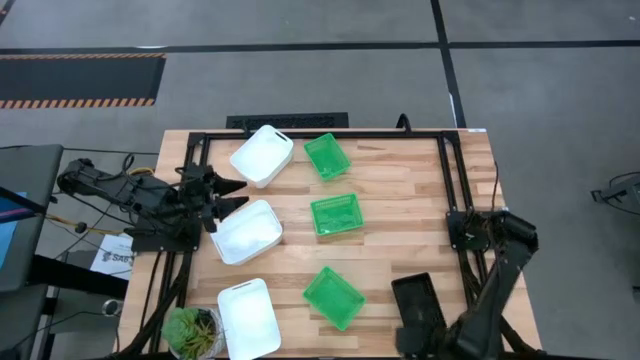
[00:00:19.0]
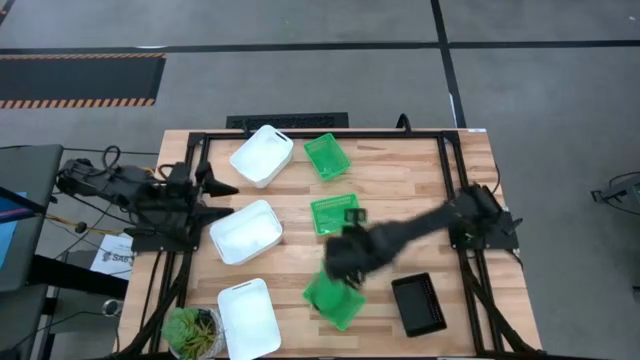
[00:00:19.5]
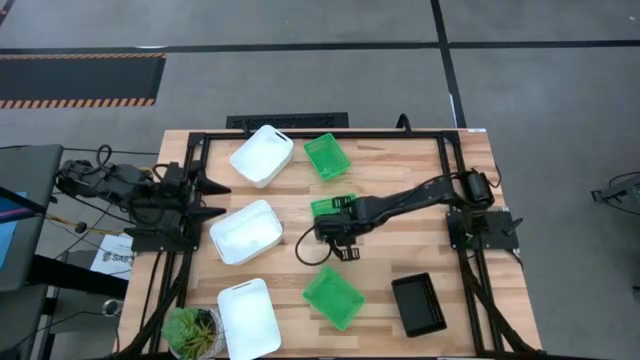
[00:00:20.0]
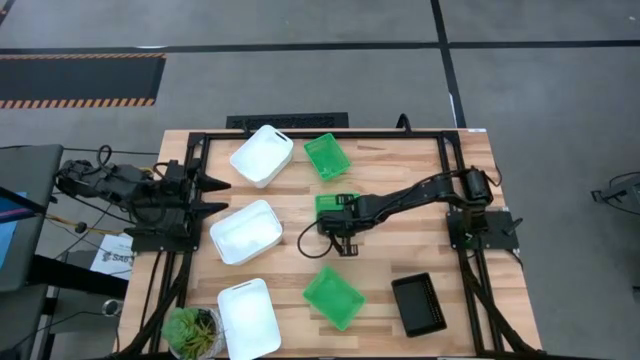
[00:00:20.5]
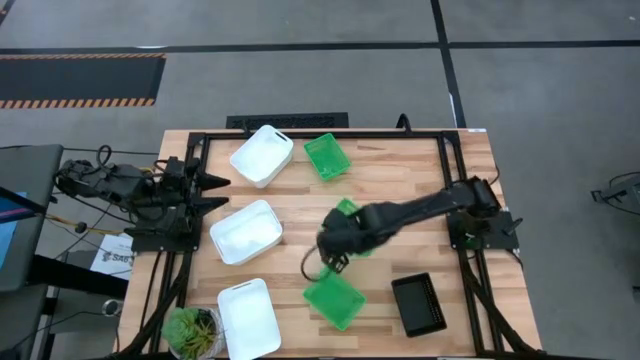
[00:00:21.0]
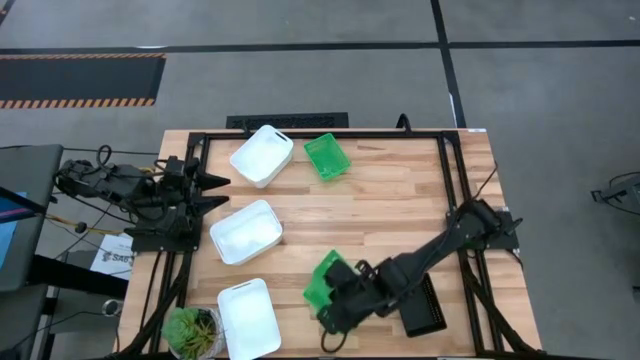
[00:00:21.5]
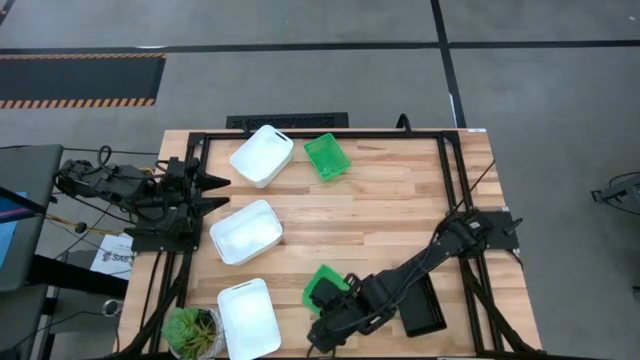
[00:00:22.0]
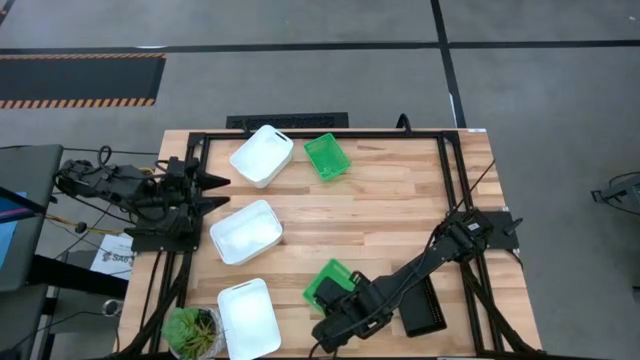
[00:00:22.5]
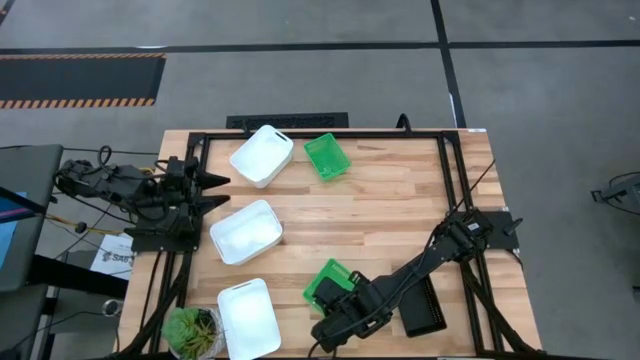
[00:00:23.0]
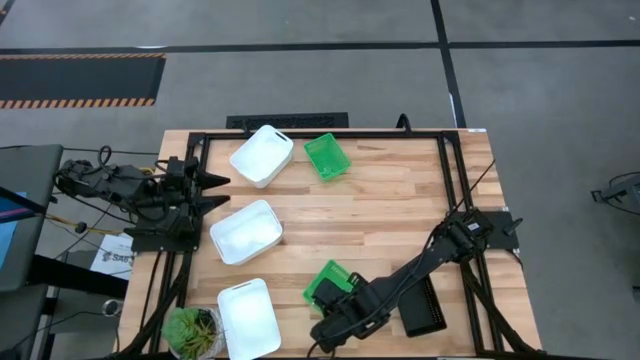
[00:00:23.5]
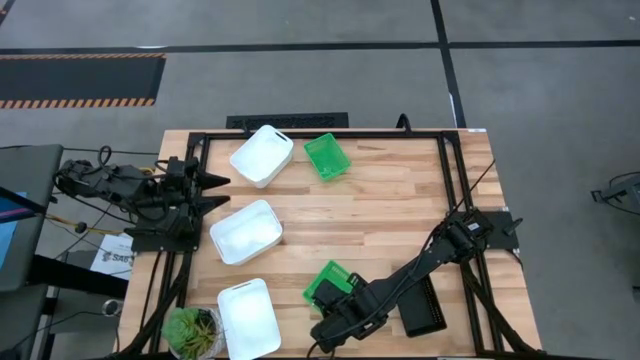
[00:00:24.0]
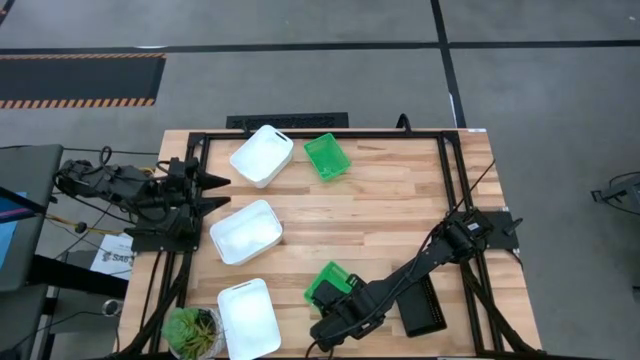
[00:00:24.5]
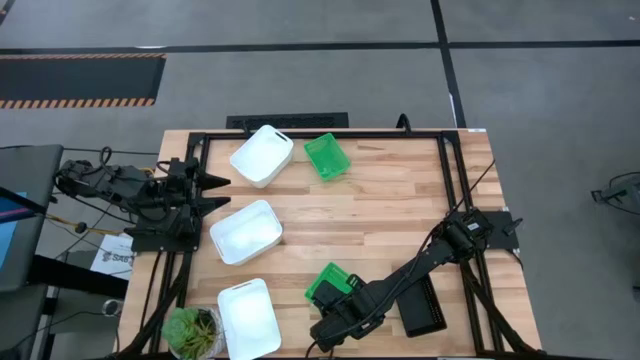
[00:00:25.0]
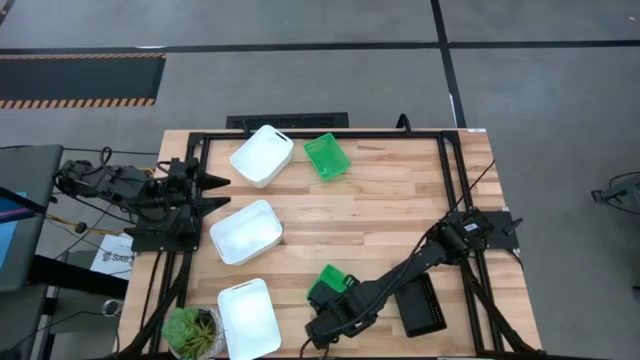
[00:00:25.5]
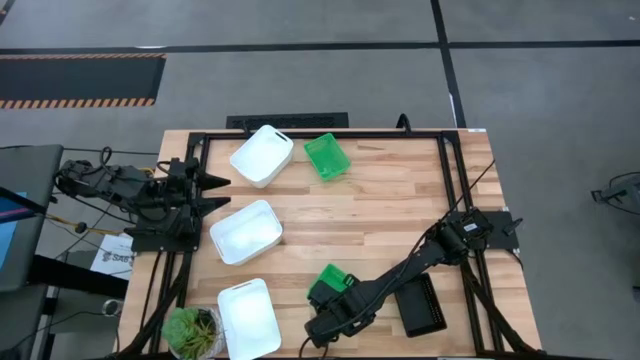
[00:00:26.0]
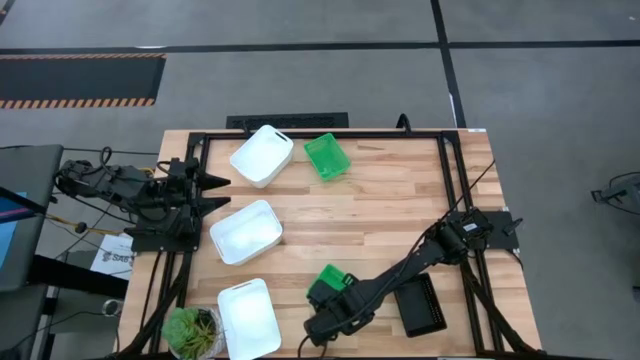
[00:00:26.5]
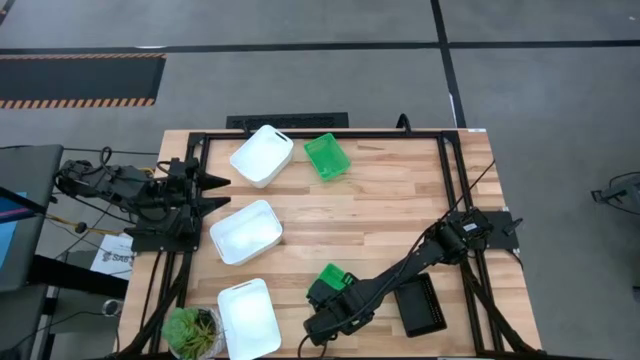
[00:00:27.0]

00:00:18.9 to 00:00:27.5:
Stack the middle green bin on the bottom green bin

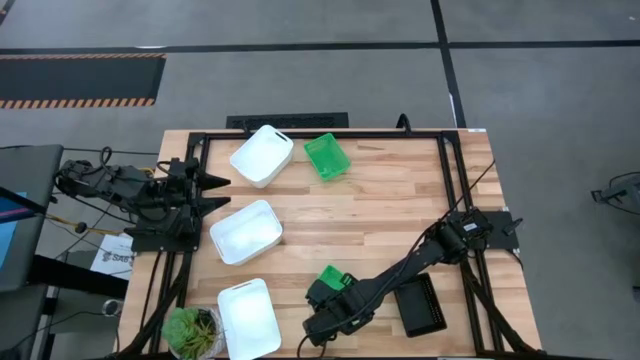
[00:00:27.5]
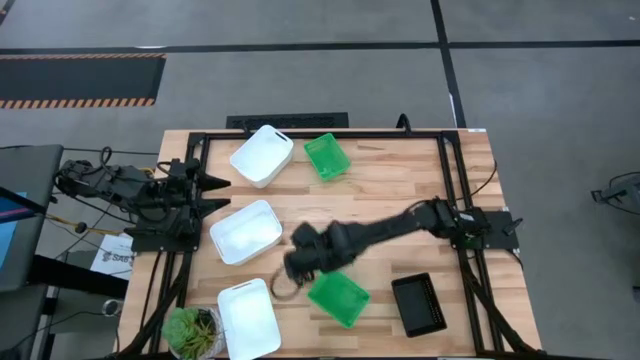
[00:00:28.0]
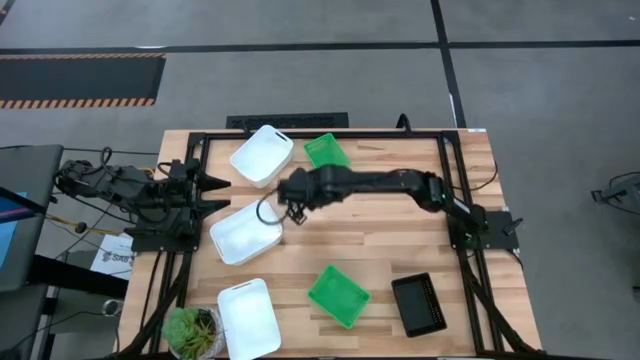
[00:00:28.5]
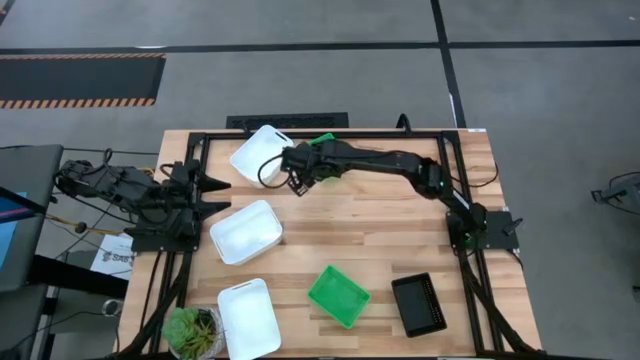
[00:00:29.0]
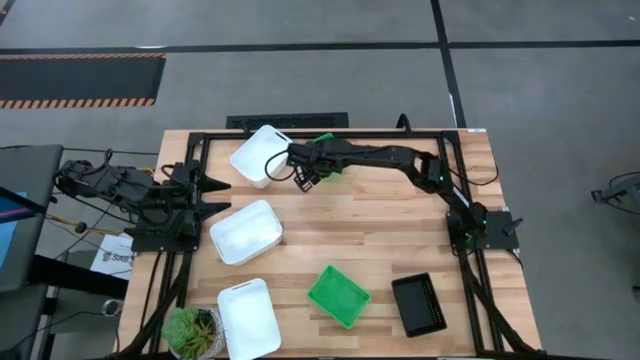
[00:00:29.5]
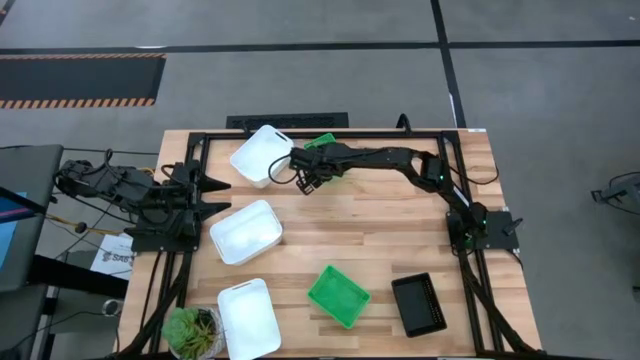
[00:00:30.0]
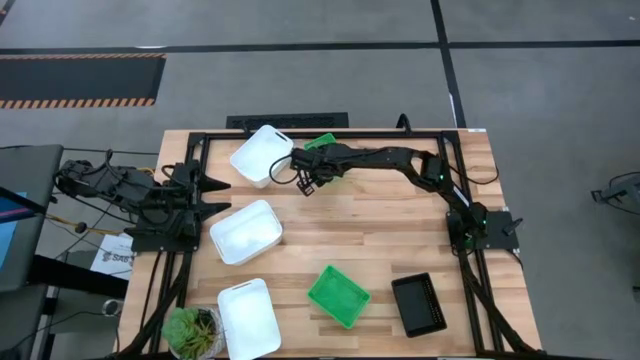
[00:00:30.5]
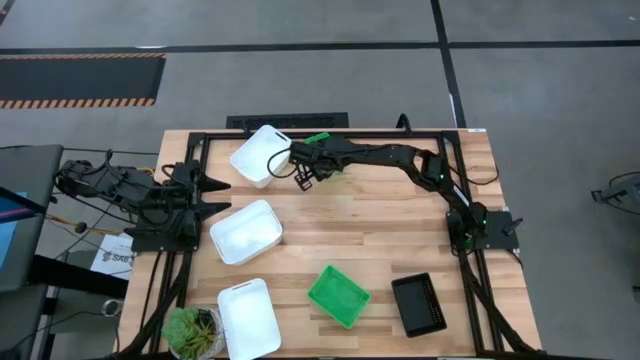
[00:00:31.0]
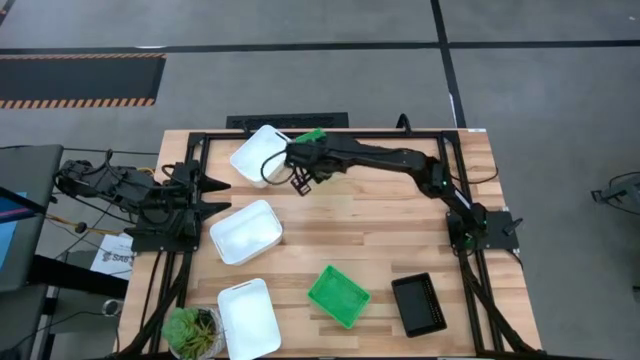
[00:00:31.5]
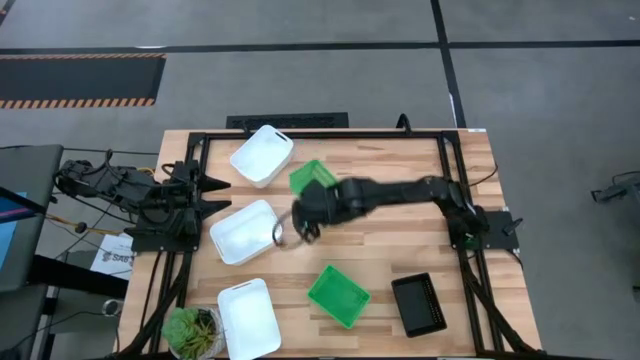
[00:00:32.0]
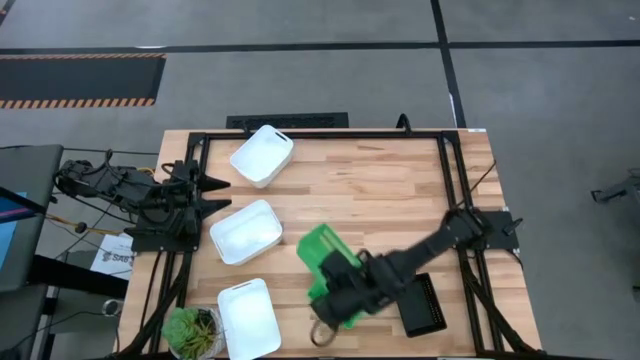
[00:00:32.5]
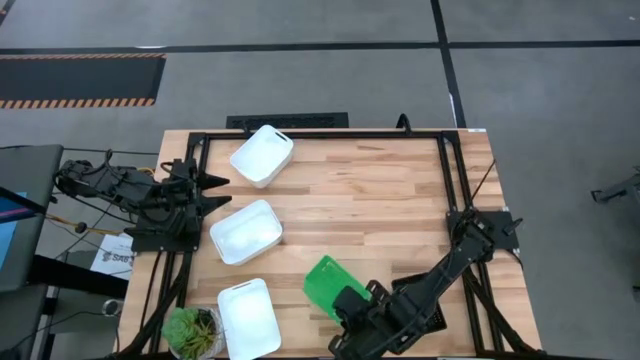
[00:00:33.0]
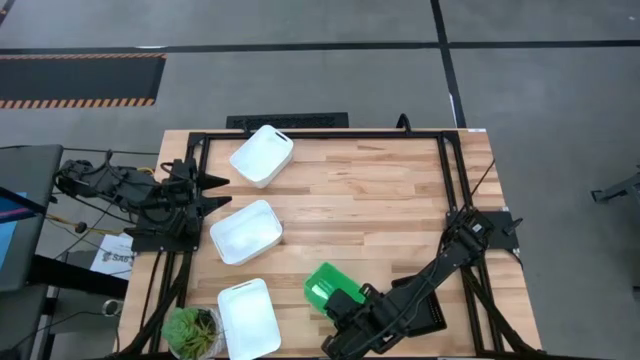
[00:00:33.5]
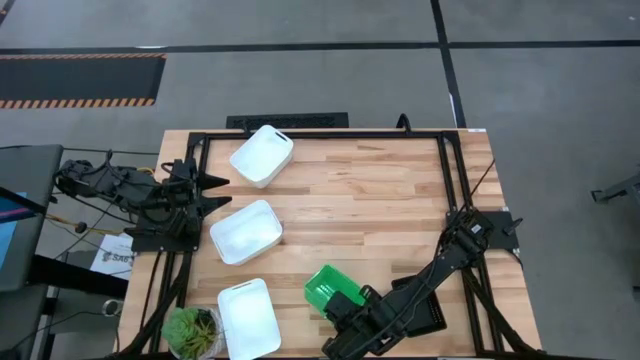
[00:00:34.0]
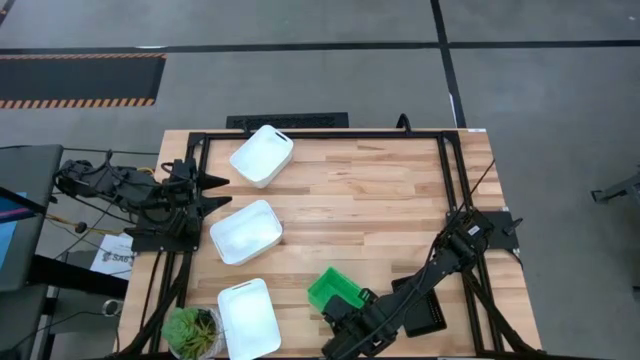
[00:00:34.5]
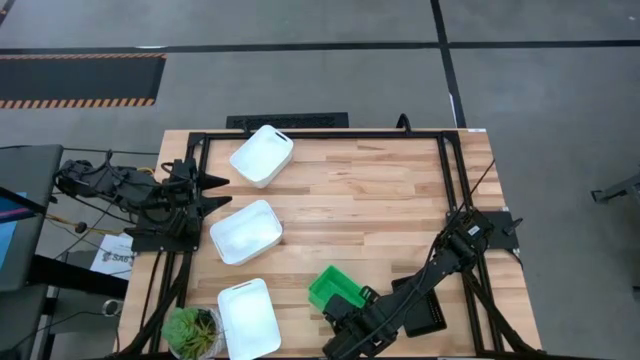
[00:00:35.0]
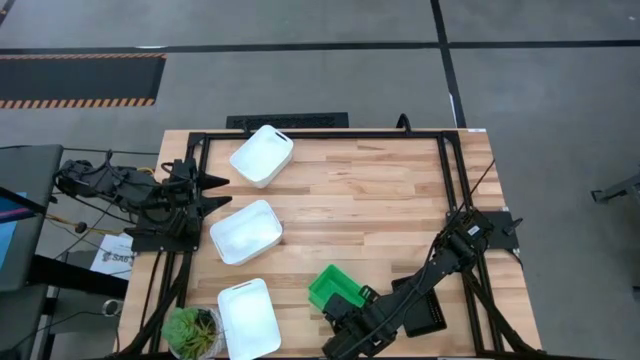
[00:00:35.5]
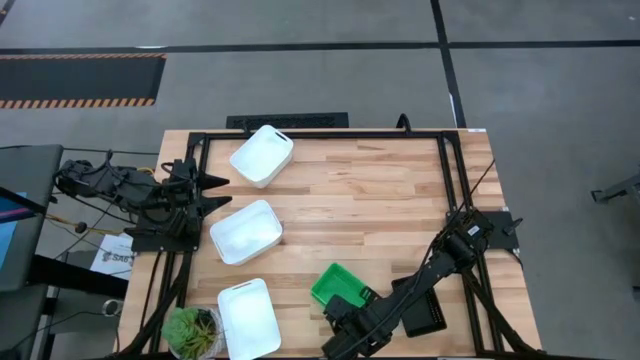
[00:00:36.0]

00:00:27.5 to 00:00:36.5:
Stack the top green bin on the bottom green bin
